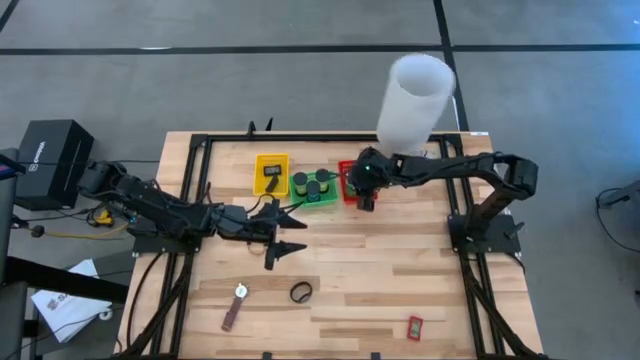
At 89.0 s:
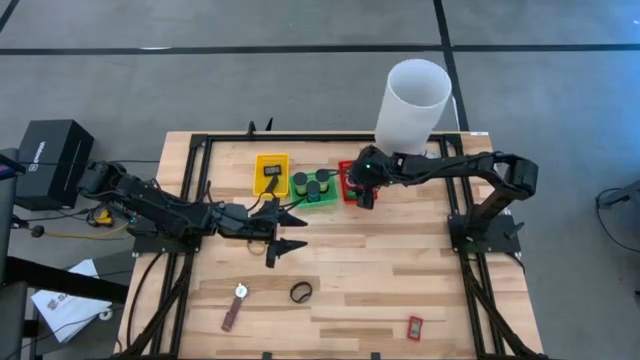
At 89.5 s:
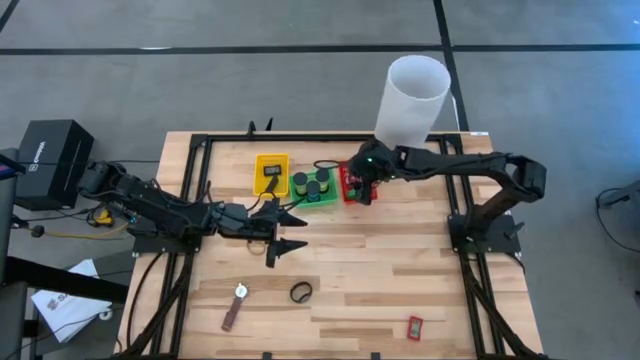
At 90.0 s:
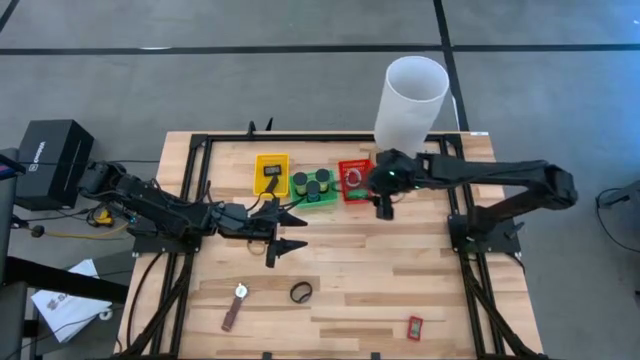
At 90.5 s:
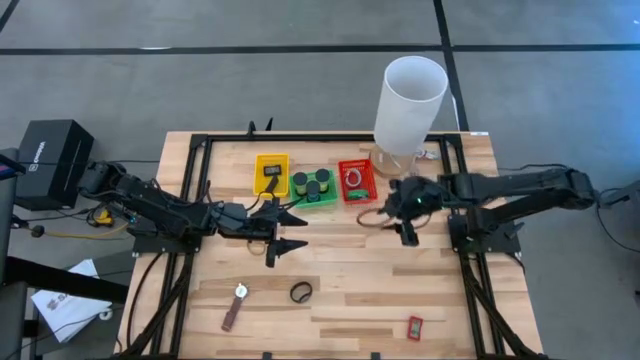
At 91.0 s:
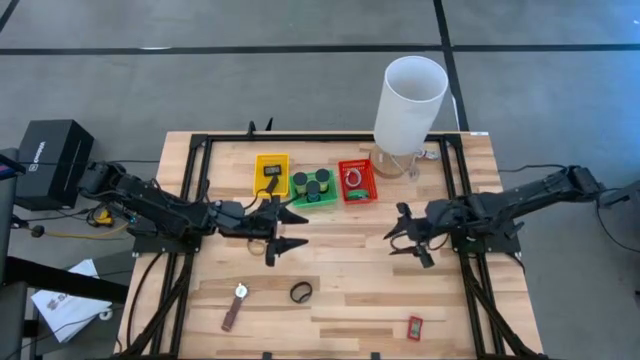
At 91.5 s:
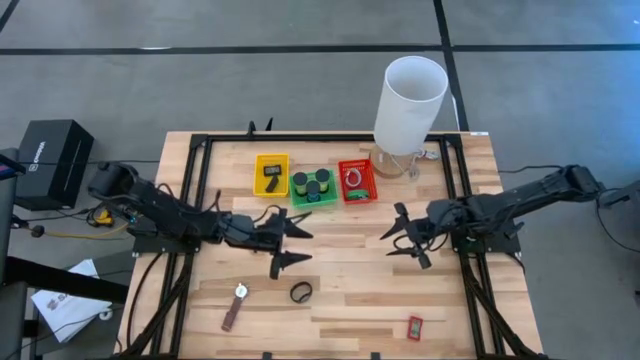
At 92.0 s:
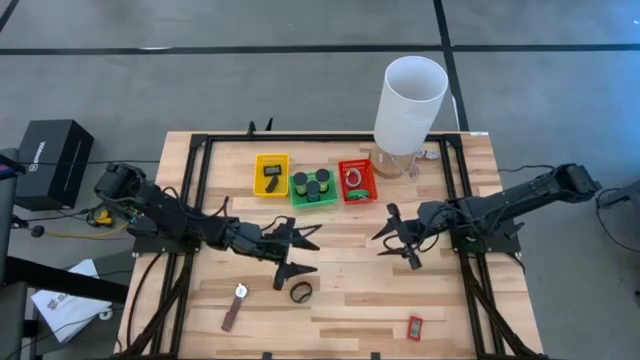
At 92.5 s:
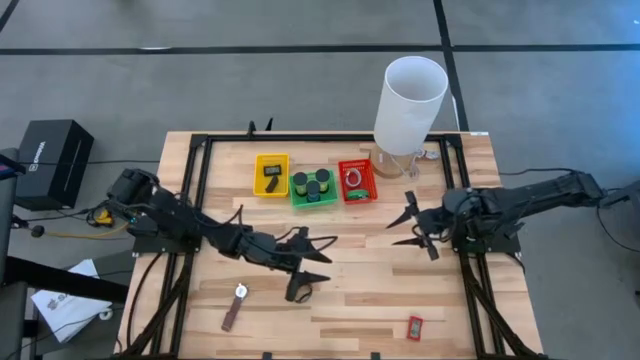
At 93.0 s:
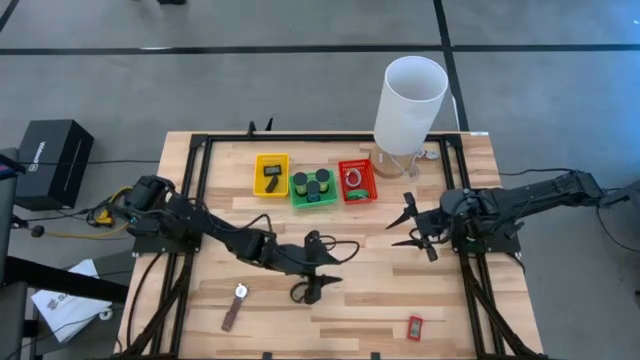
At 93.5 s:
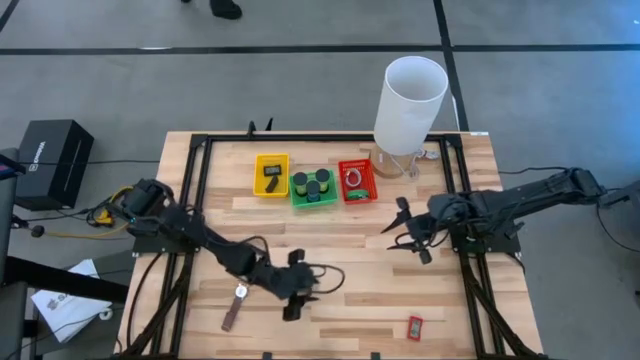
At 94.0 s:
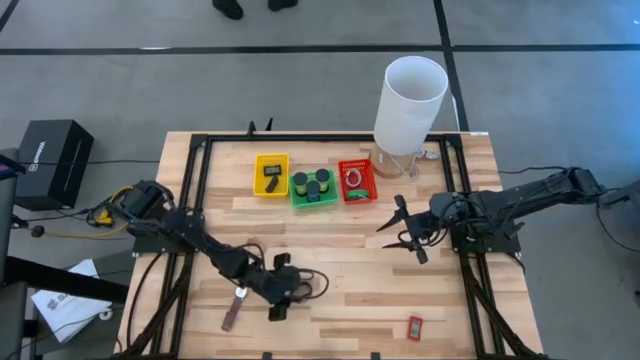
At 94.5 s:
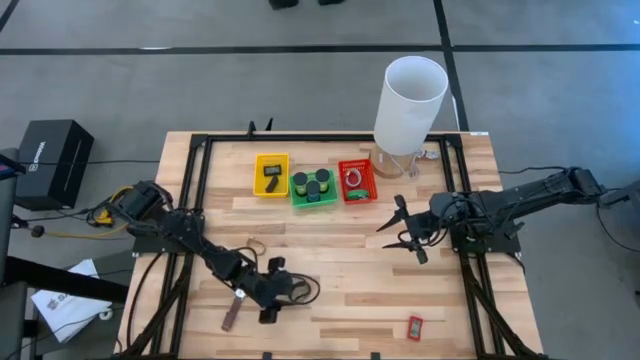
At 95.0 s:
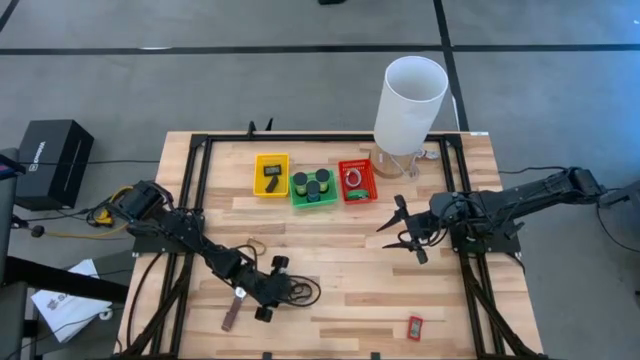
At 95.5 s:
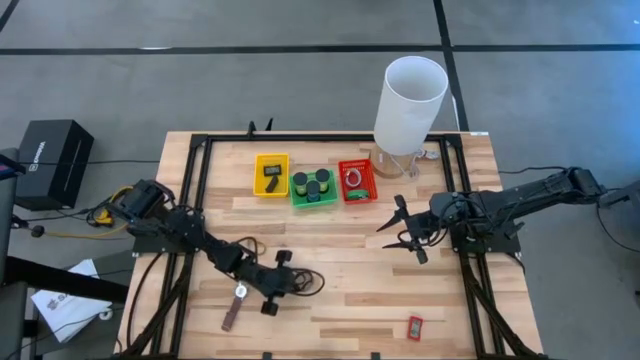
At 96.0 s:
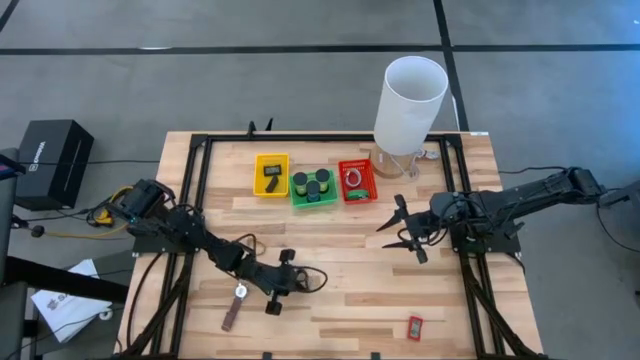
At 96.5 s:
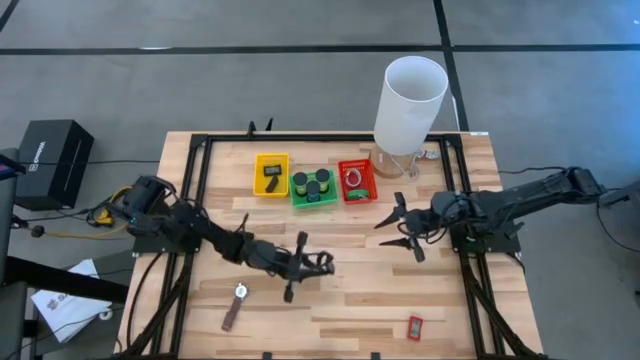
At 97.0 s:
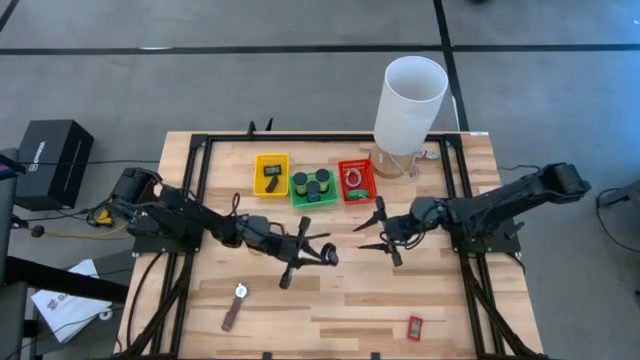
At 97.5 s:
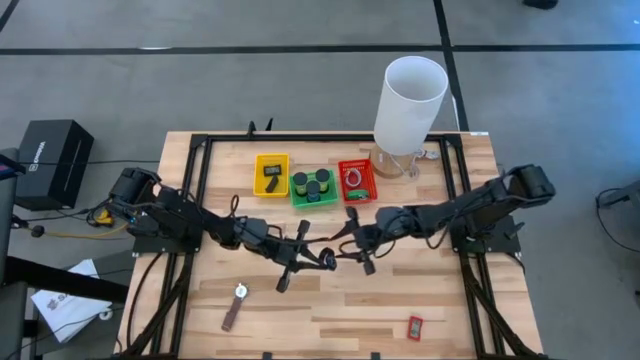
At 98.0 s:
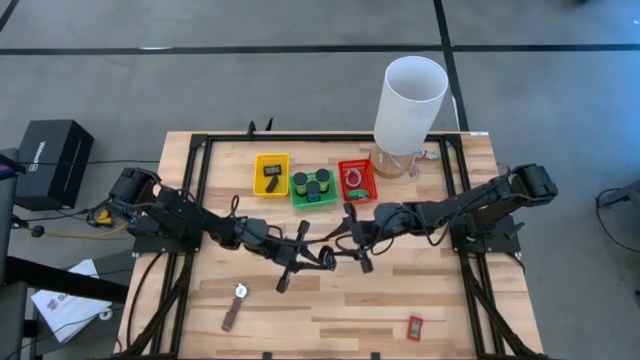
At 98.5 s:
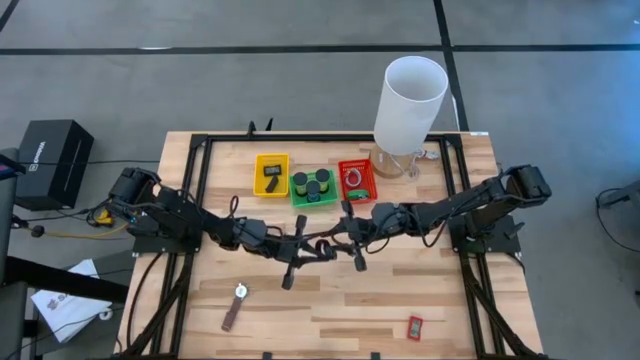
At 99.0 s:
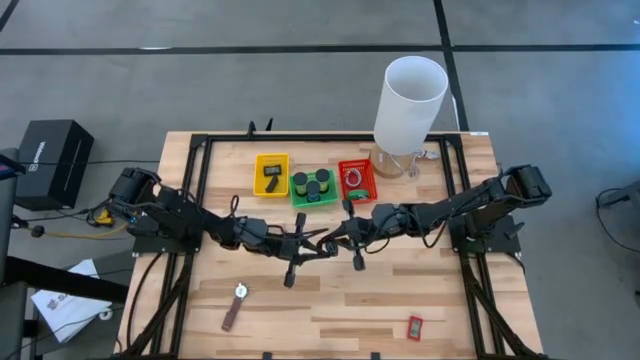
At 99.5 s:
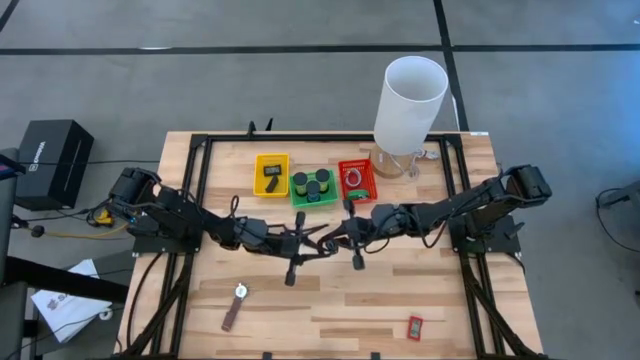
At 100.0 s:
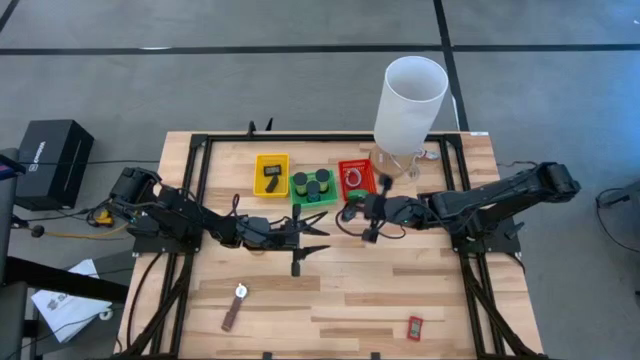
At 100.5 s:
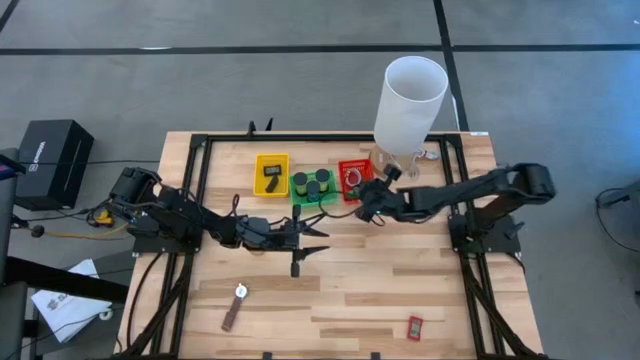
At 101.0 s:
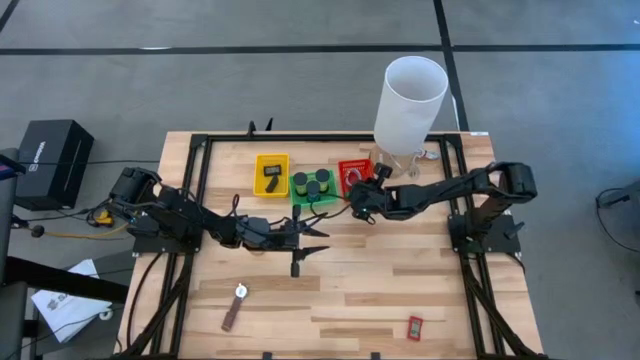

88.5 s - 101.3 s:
Task: Pick & Place Office items
Put the black wrist watch into the red basket

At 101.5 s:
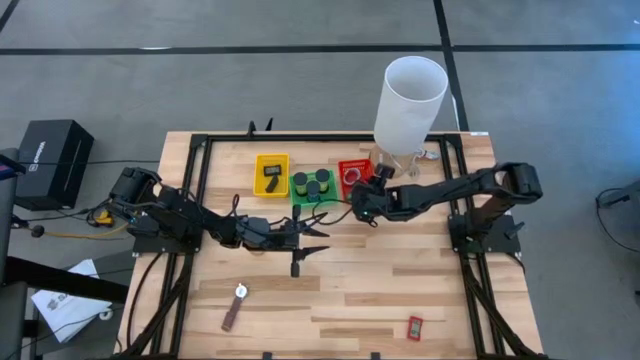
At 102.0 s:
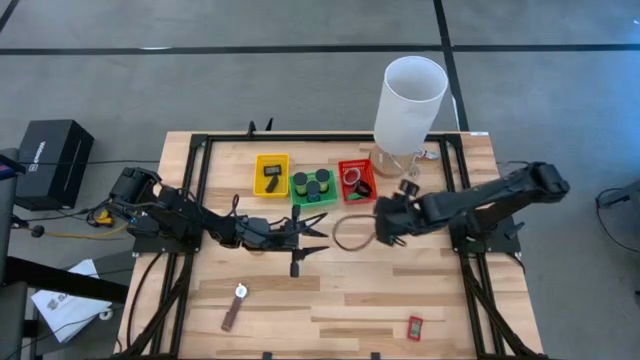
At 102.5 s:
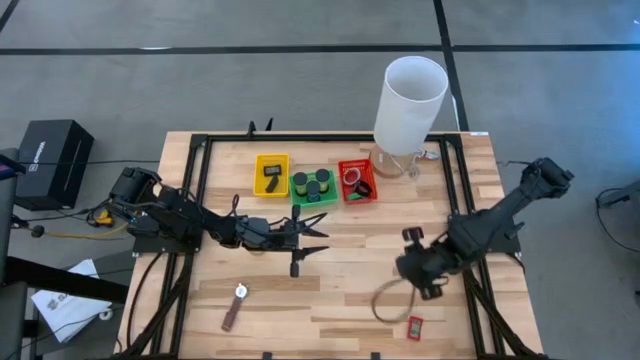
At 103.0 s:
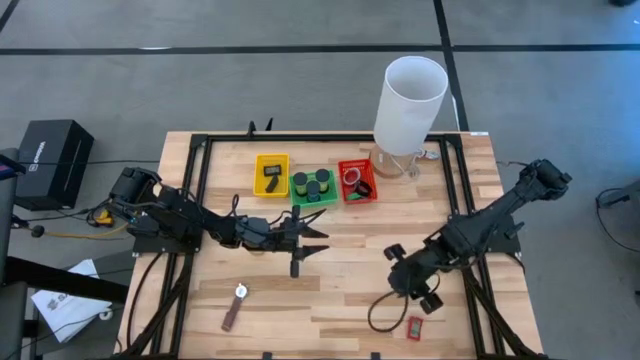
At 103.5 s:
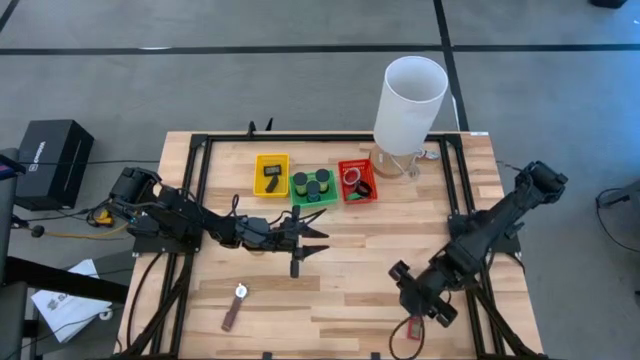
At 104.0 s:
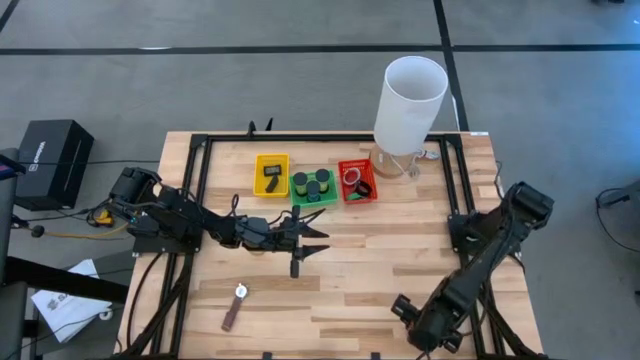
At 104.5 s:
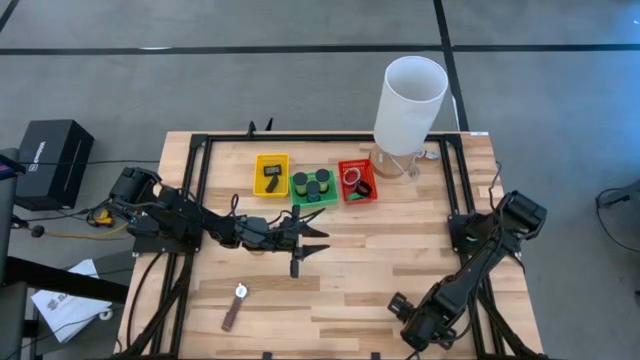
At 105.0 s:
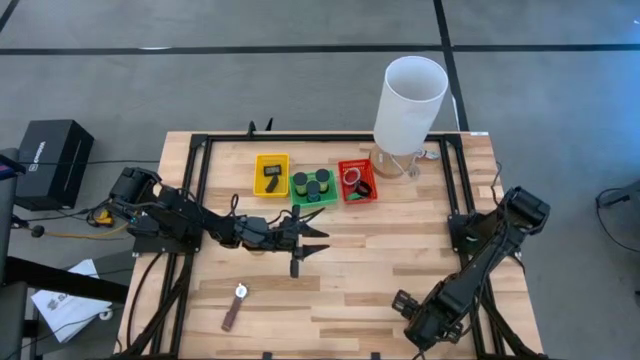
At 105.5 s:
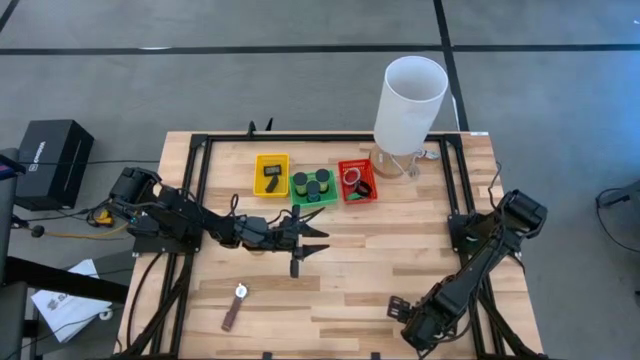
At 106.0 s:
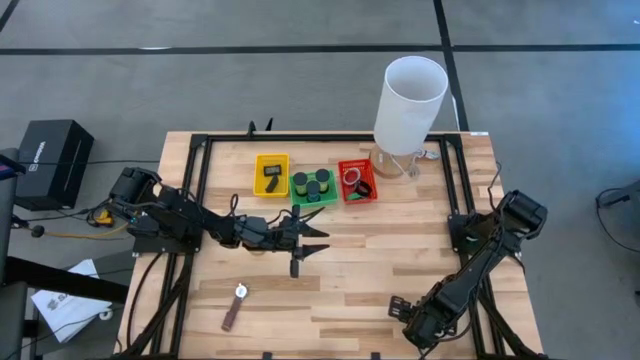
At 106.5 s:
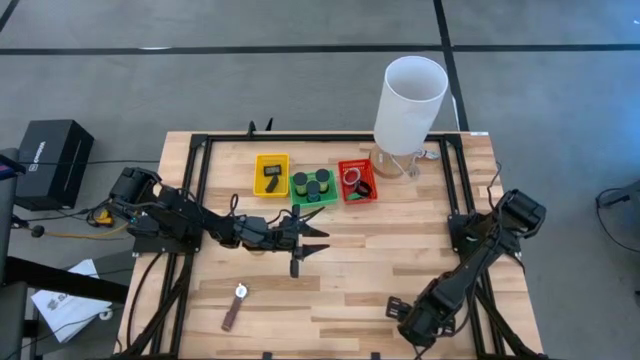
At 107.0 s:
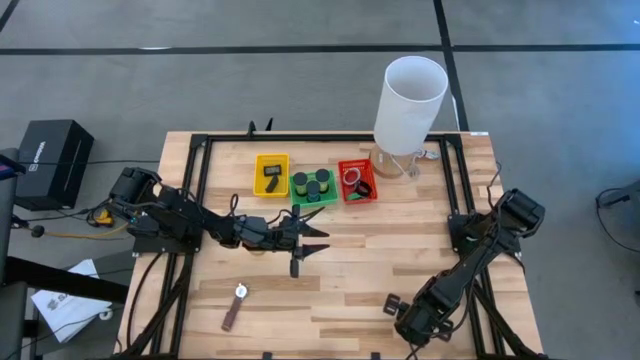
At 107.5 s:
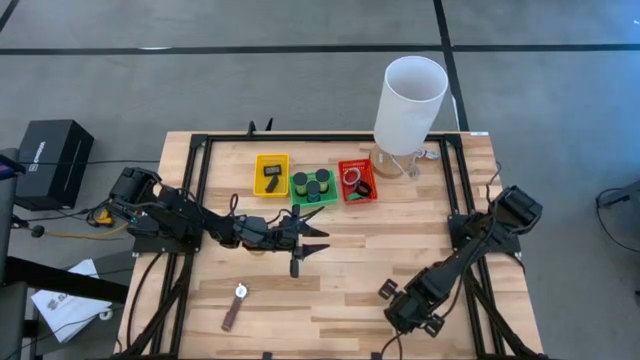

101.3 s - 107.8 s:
Put the red digital watch into the yellow basket
